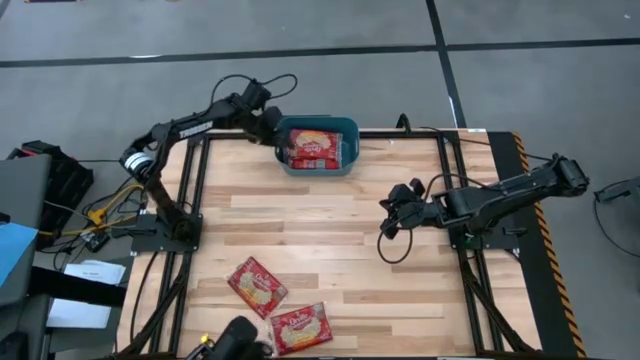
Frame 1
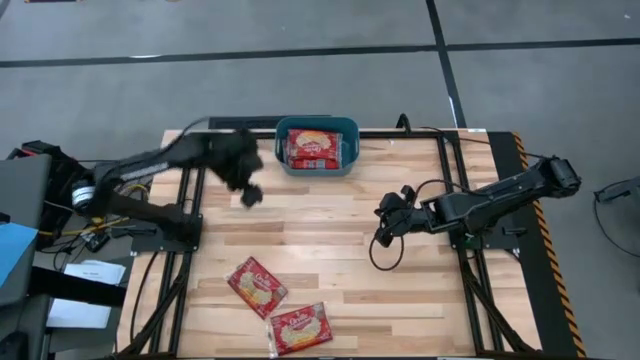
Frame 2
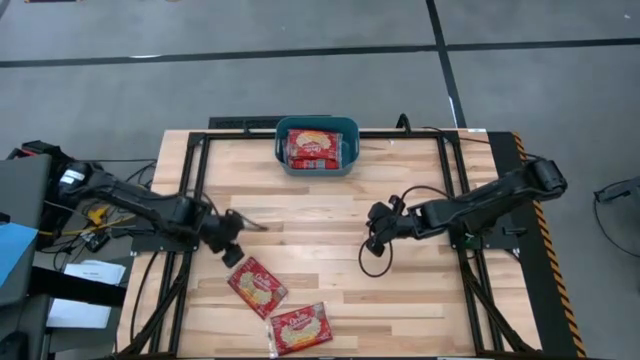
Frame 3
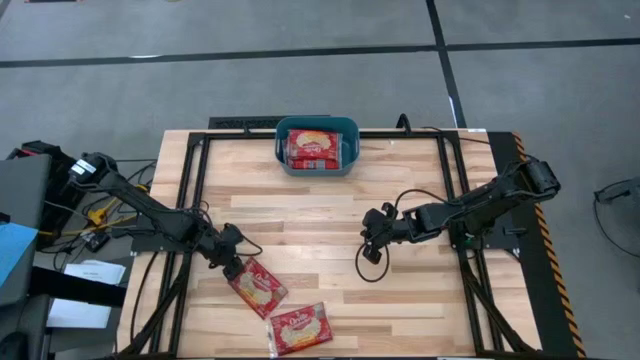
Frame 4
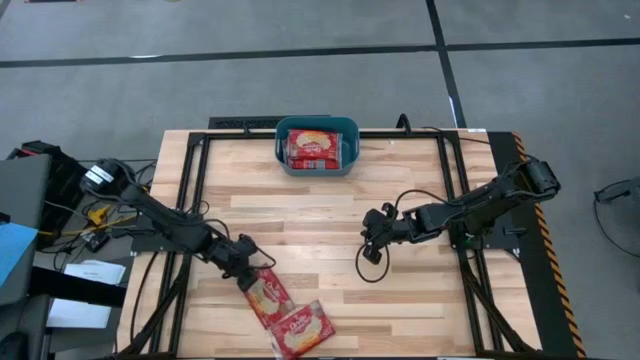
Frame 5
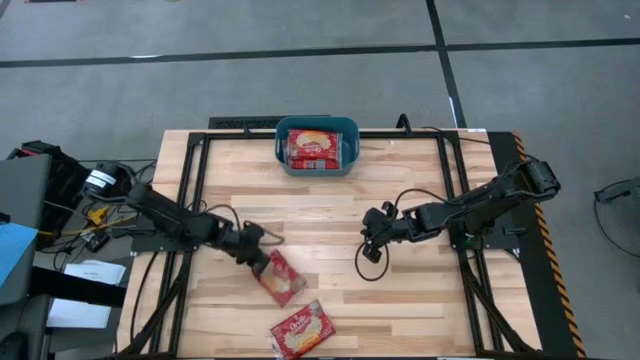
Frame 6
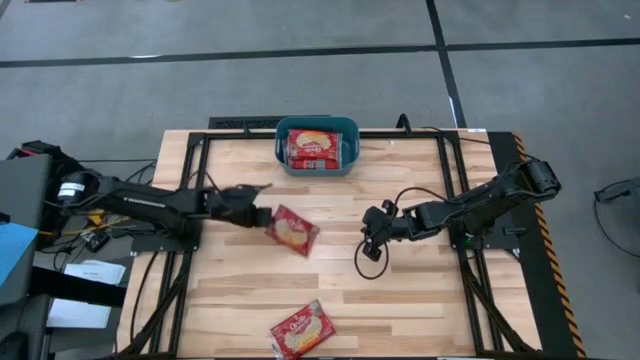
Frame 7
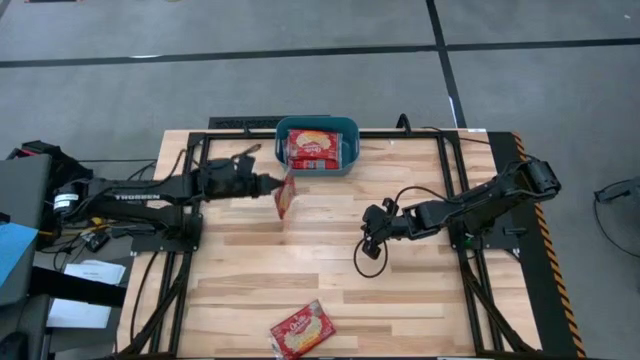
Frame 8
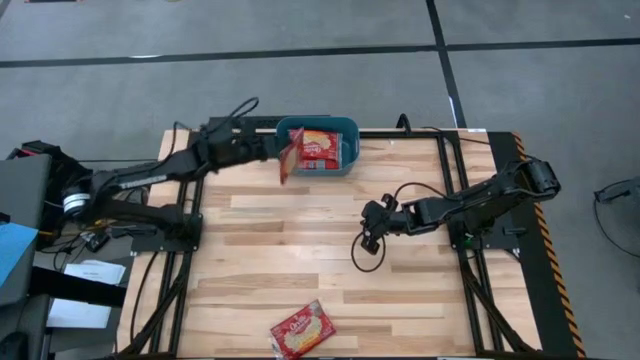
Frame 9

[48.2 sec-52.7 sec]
Task: Sort popcorn bags into baskets
Put the top red popcorn bag into the blue bin

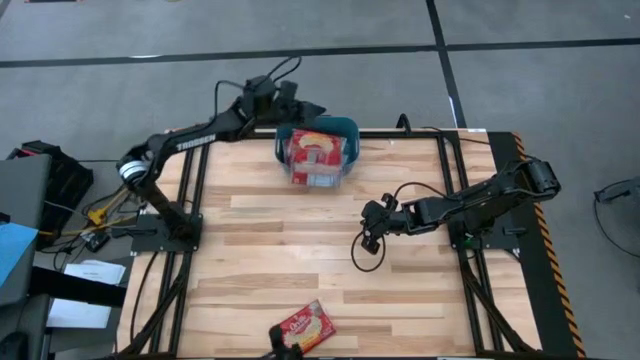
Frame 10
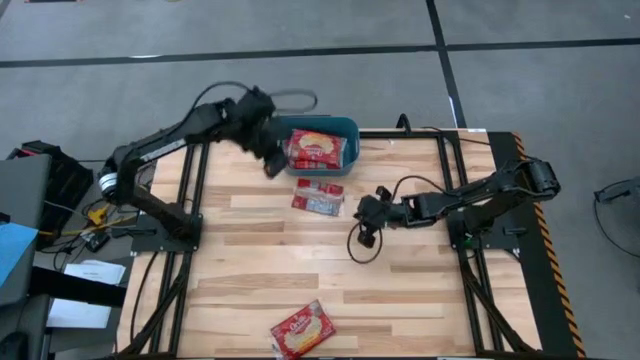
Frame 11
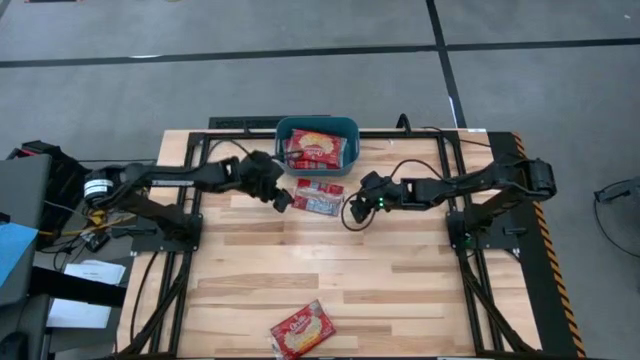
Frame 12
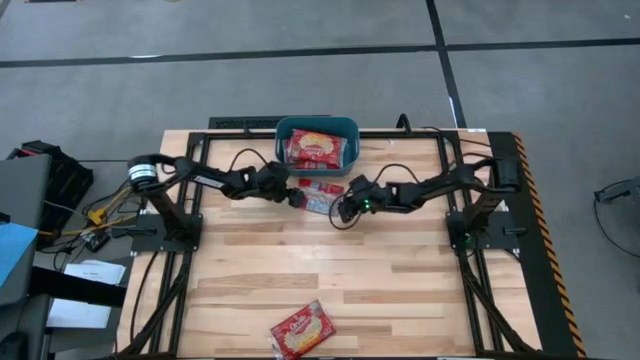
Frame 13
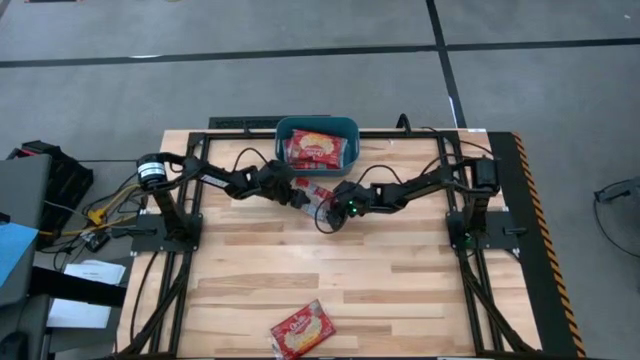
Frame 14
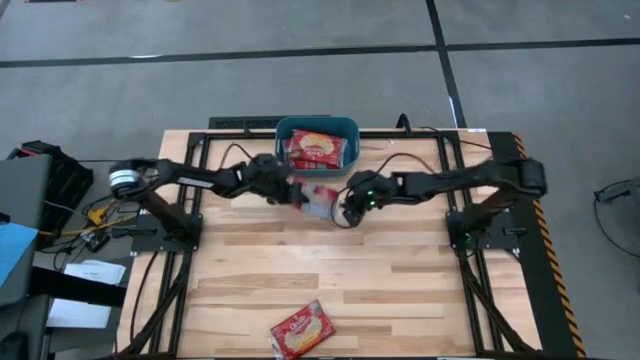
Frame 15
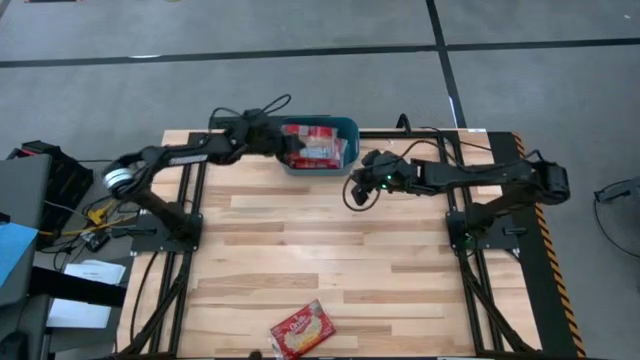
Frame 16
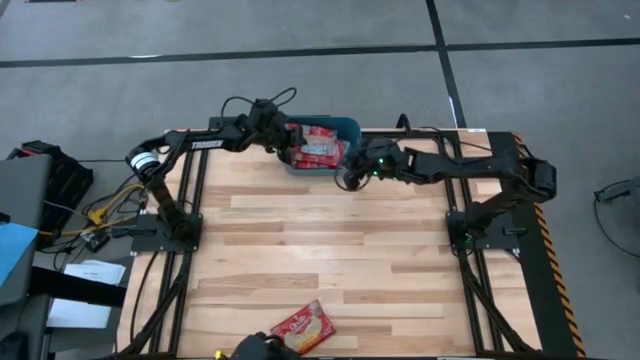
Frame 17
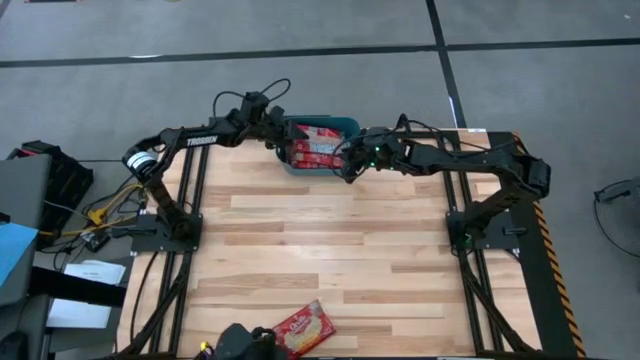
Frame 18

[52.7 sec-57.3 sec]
Put the top red popcorn bag into the blue bin

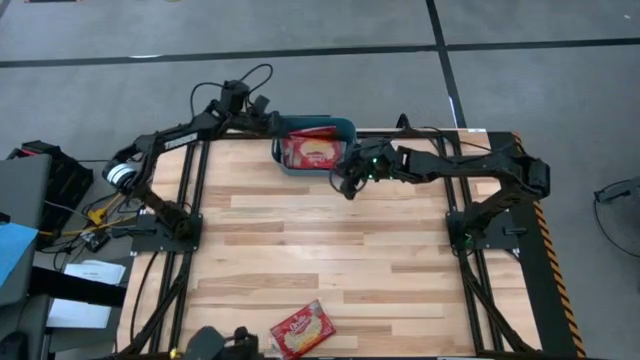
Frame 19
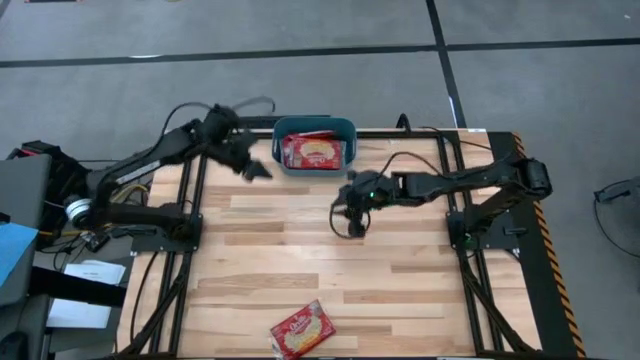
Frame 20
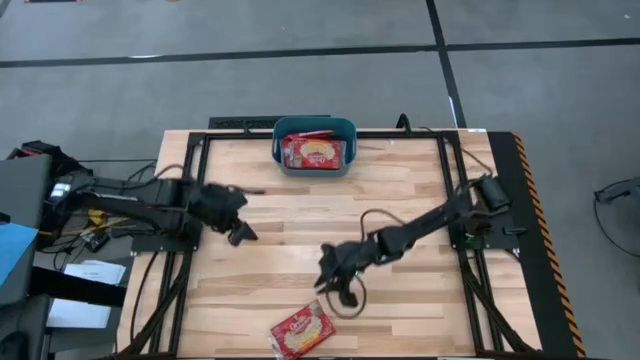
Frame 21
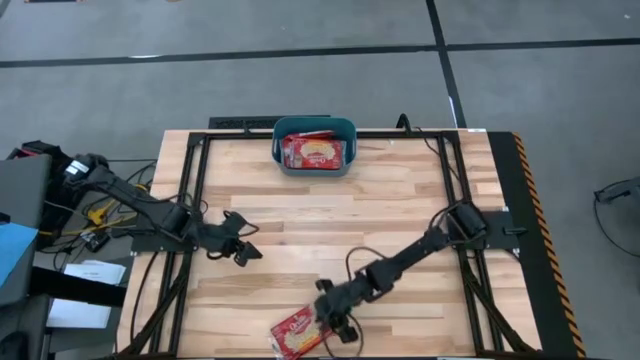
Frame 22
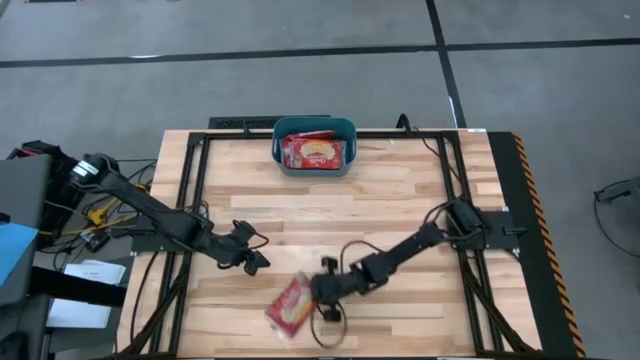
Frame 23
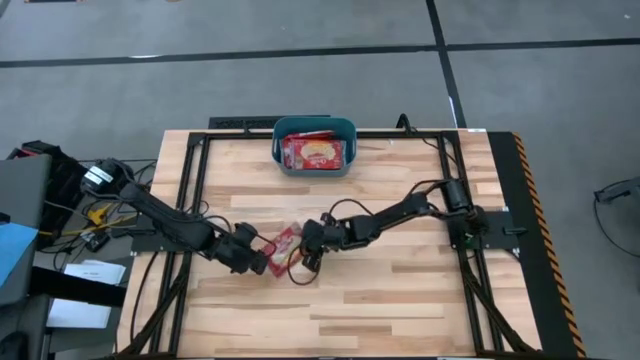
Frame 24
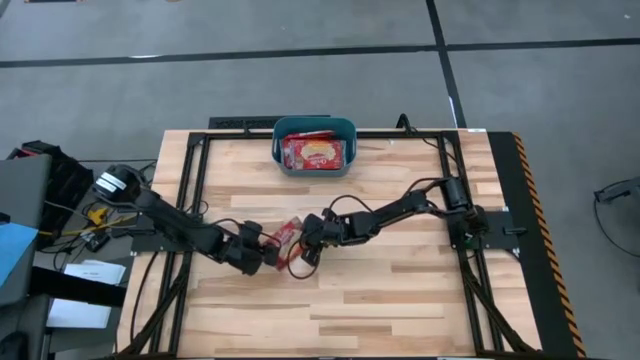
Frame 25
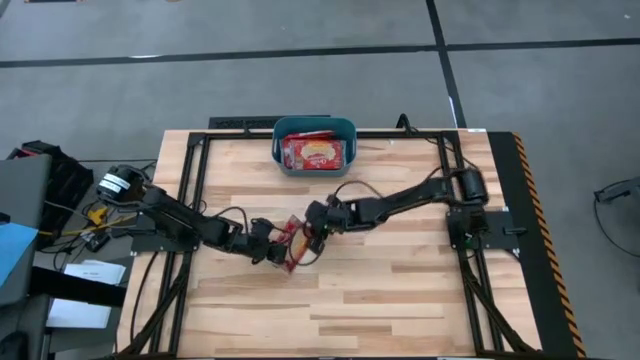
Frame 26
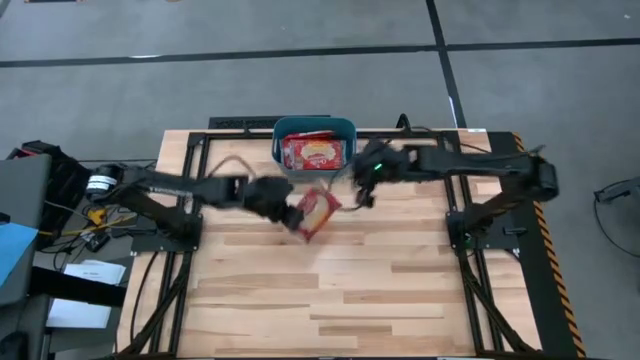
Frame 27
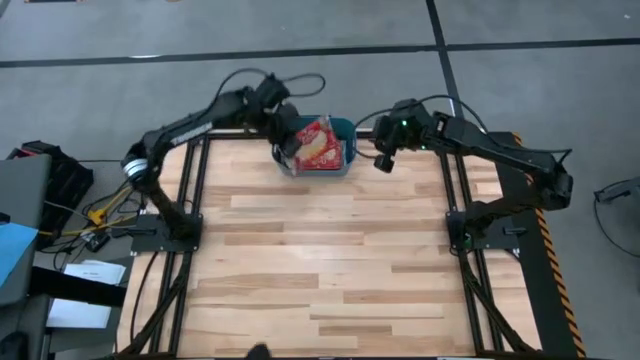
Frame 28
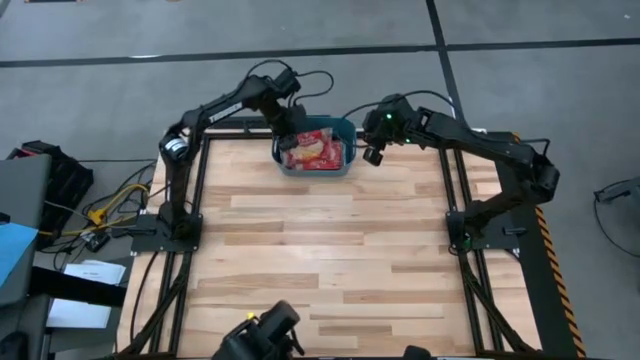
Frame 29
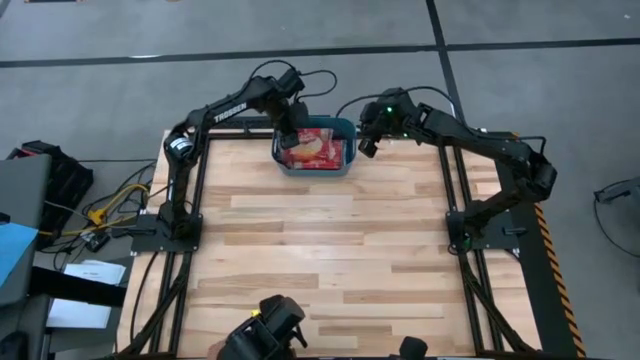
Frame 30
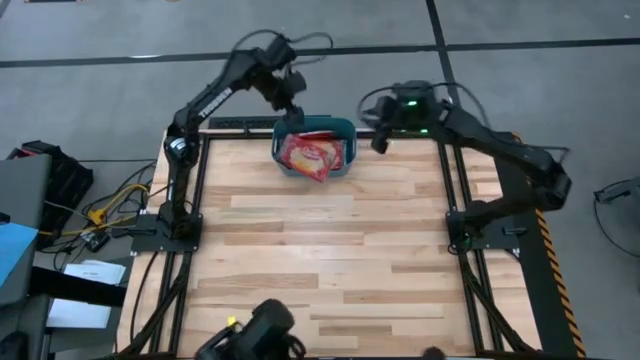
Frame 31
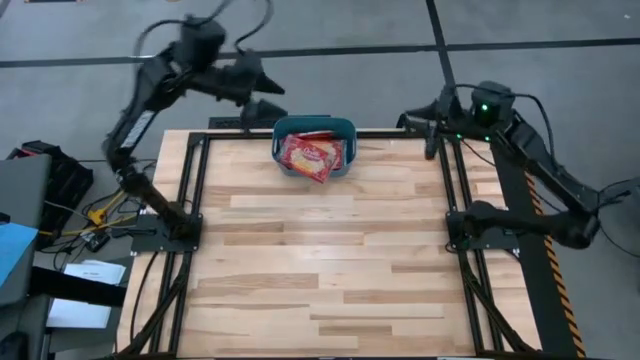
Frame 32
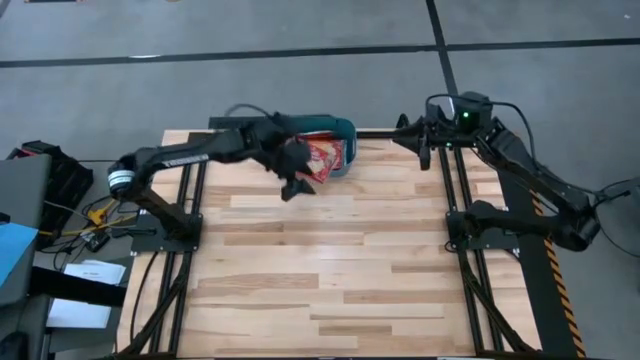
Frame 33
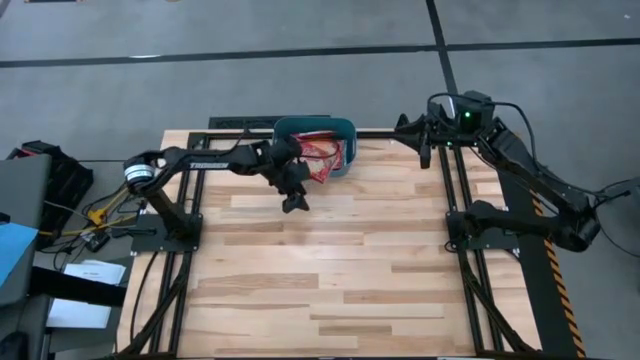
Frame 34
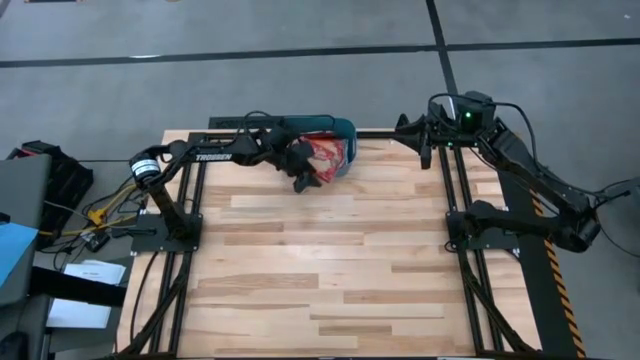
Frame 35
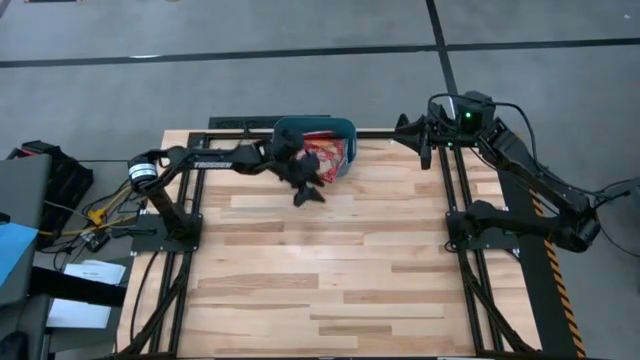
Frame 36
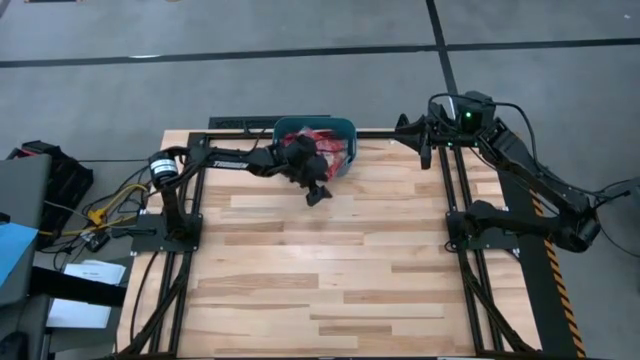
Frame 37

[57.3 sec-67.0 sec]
Put the red popcorn bag into the blue bin

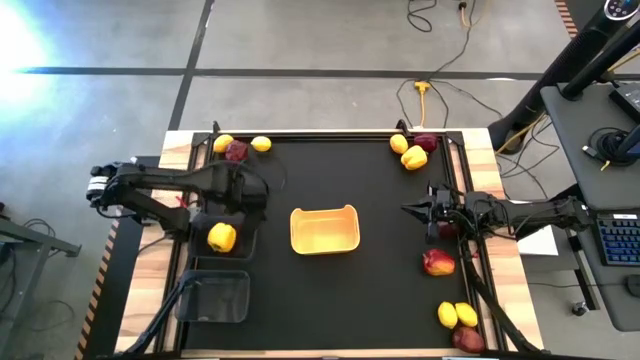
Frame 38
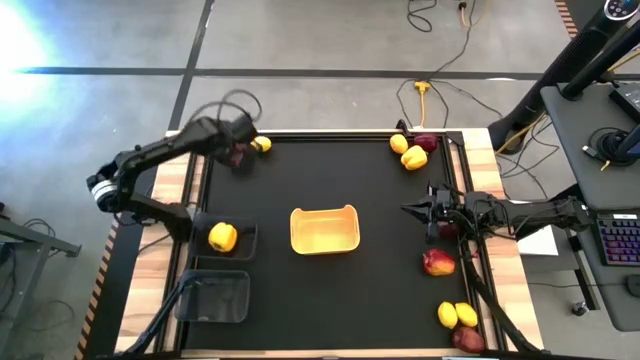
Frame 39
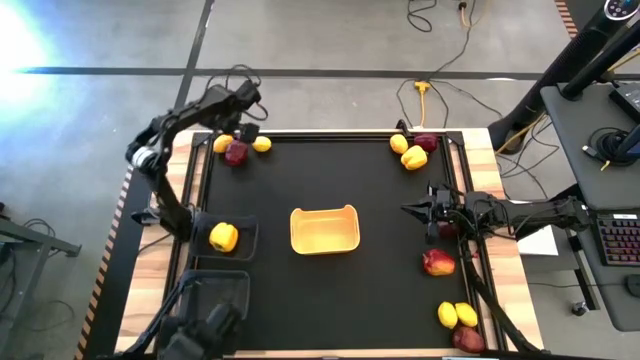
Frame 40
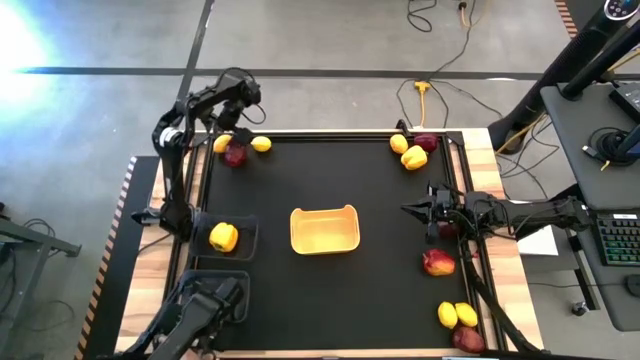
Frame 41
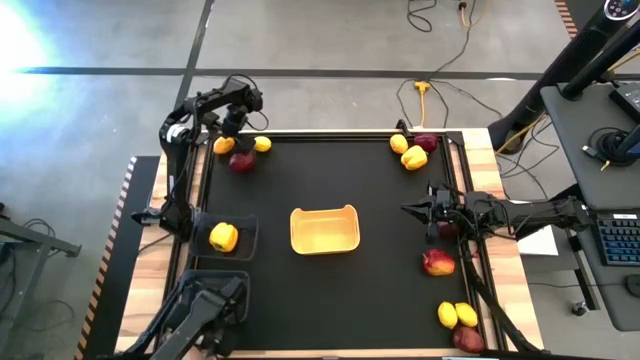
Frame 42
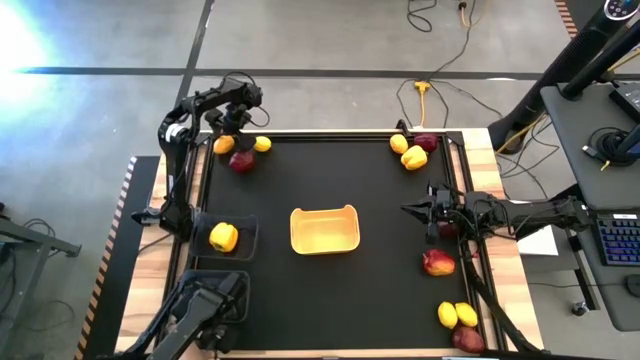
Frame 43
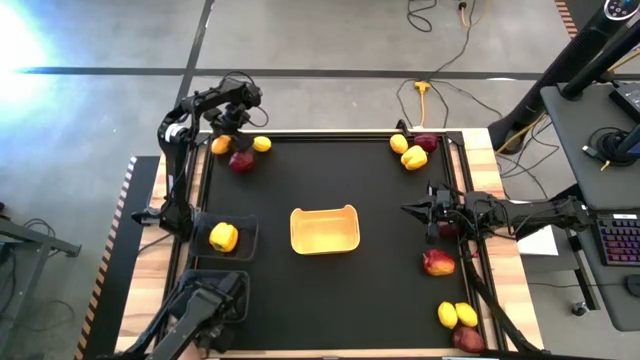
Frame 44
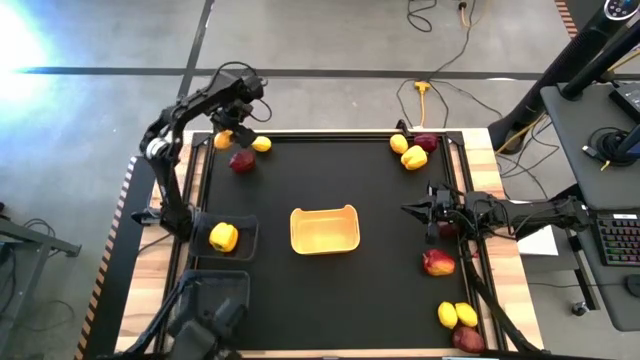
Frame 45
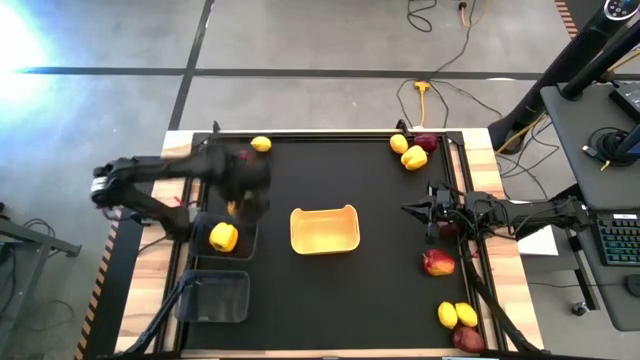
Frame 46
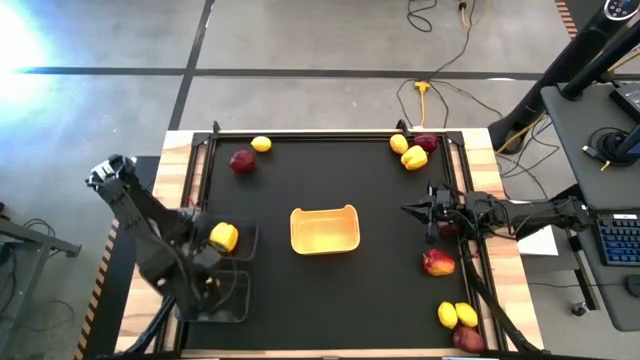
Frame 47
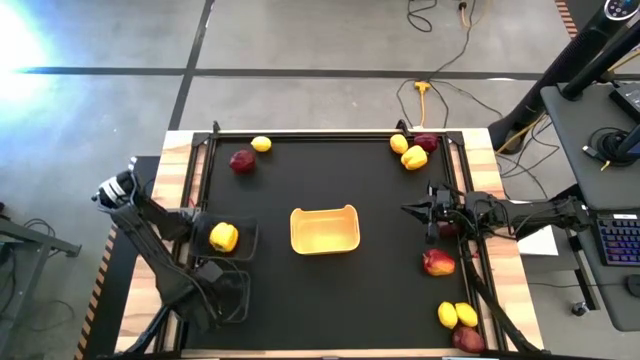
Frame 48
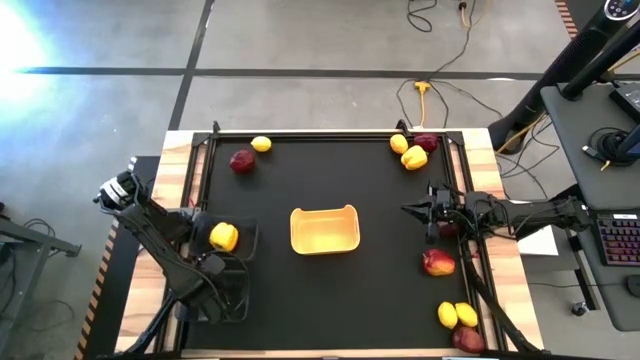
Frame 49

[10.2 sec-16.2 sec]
Task: Sort produce into baskets
Put the yellow lemon into the bottom black transparent bin
